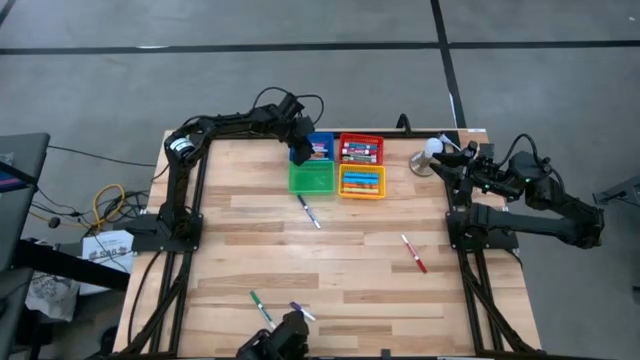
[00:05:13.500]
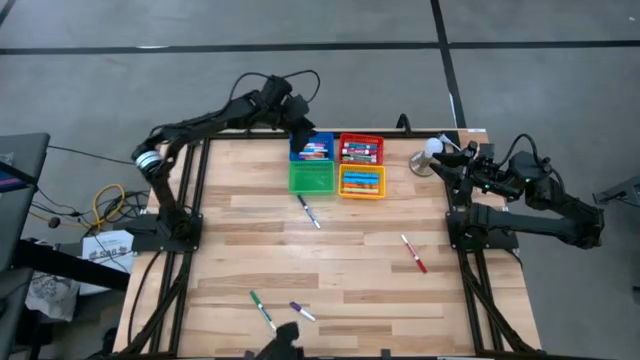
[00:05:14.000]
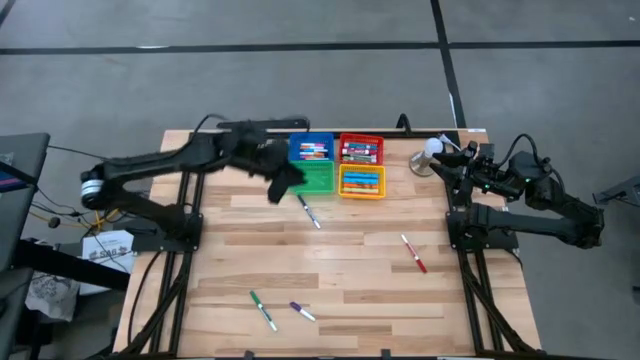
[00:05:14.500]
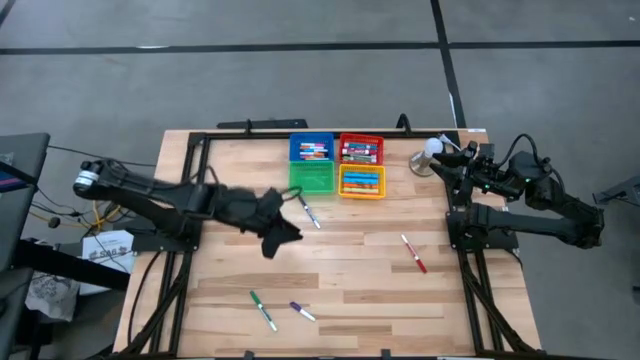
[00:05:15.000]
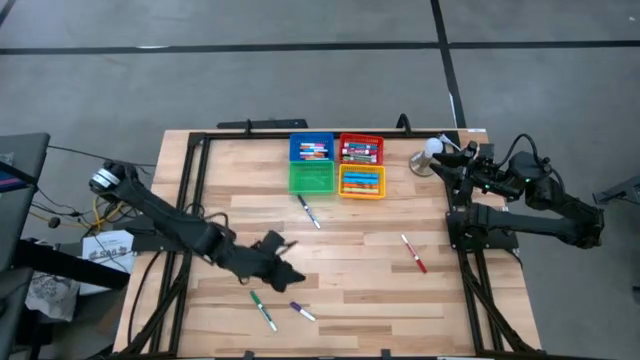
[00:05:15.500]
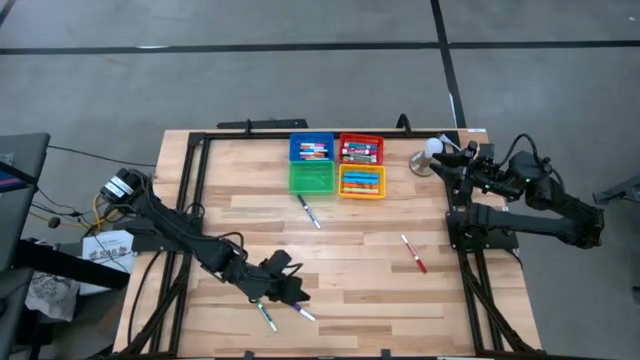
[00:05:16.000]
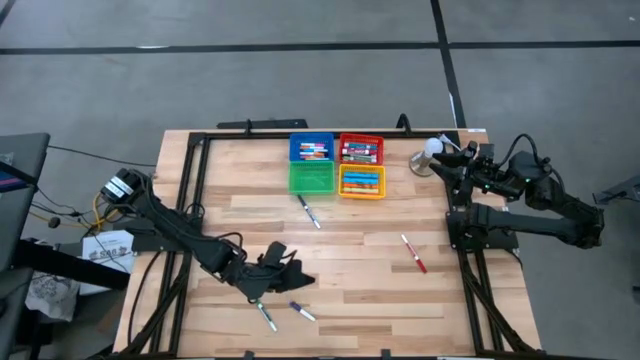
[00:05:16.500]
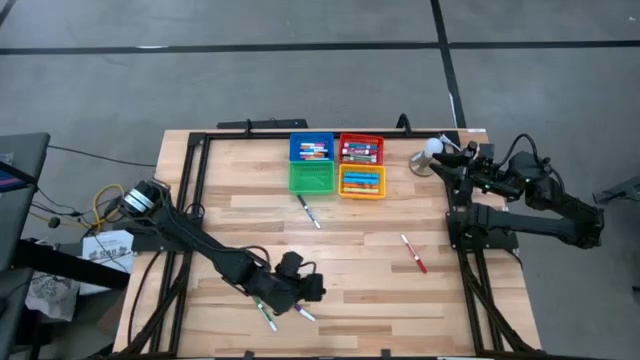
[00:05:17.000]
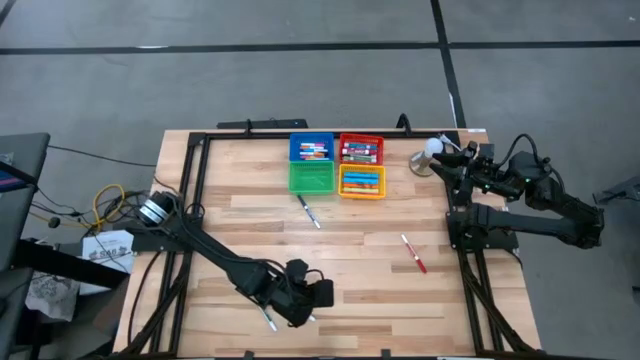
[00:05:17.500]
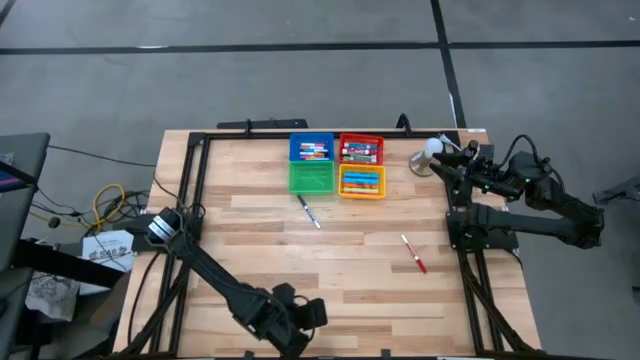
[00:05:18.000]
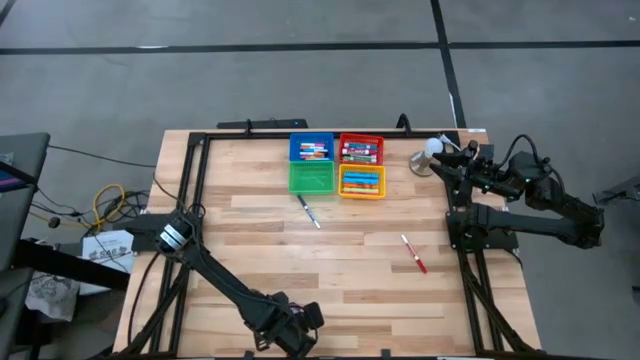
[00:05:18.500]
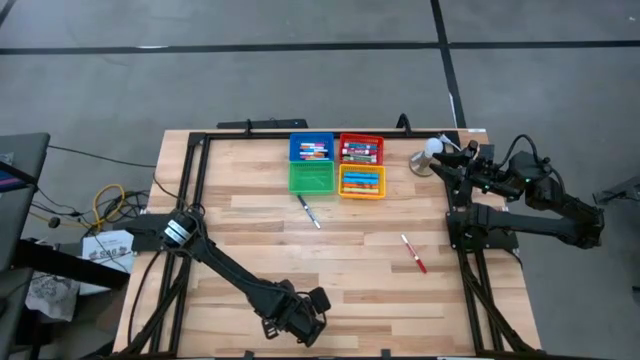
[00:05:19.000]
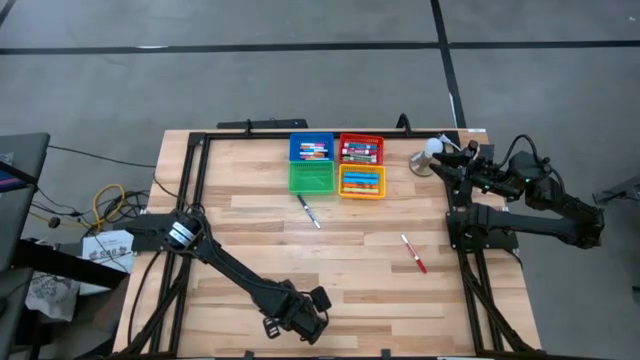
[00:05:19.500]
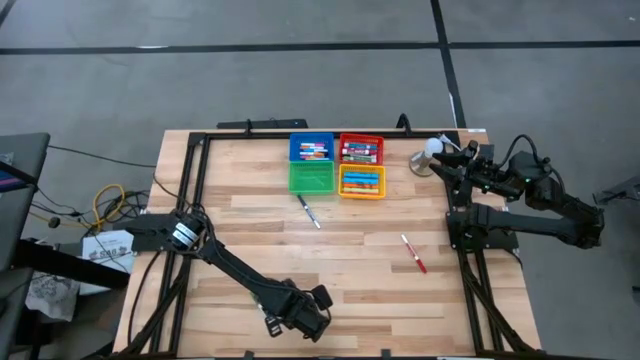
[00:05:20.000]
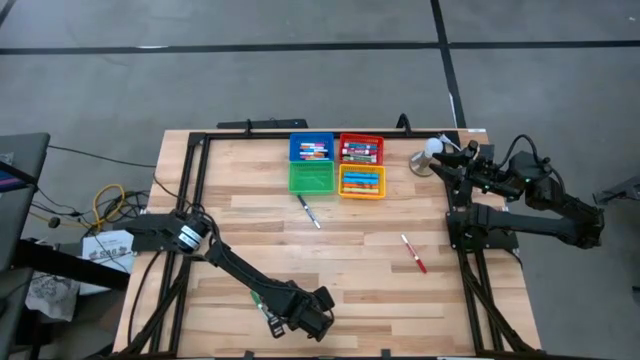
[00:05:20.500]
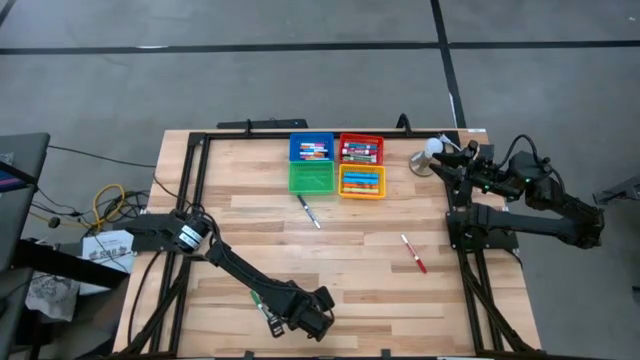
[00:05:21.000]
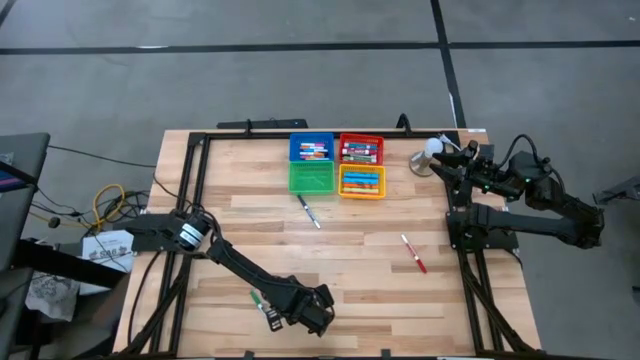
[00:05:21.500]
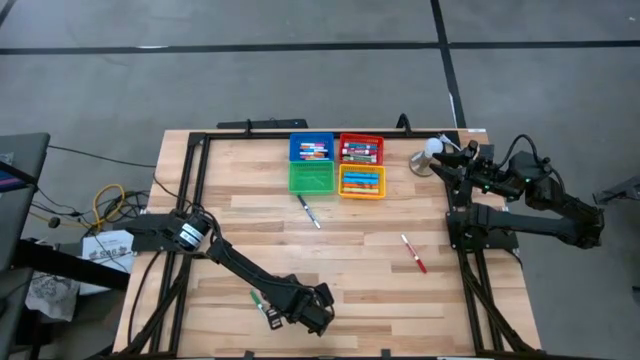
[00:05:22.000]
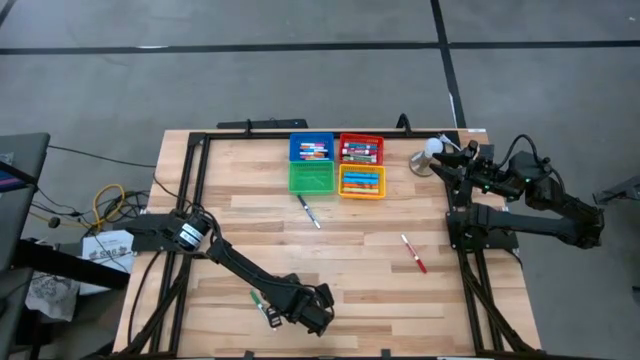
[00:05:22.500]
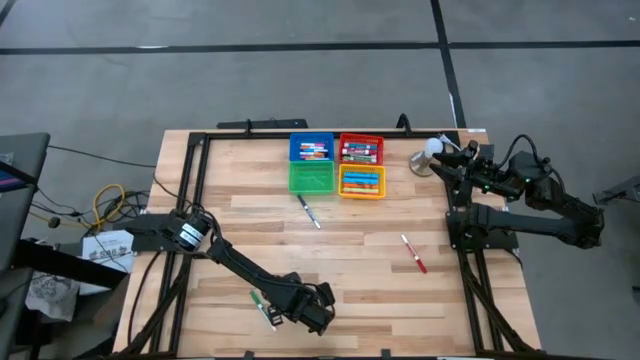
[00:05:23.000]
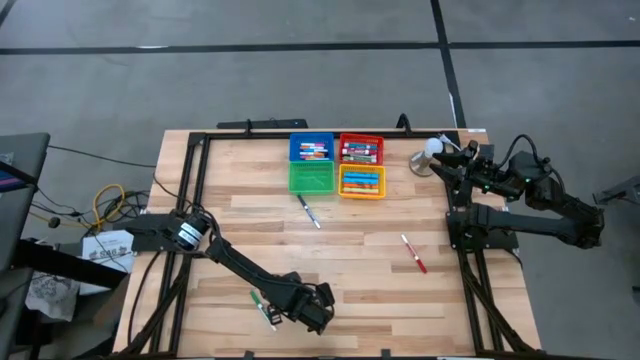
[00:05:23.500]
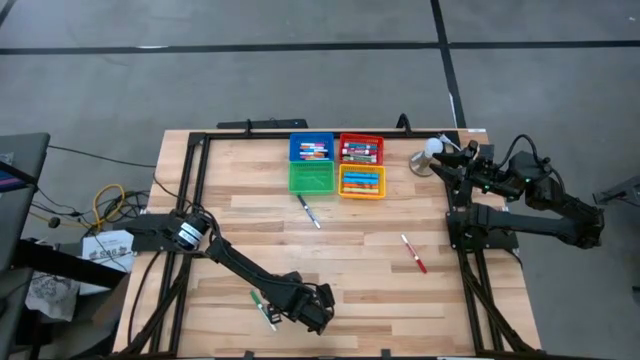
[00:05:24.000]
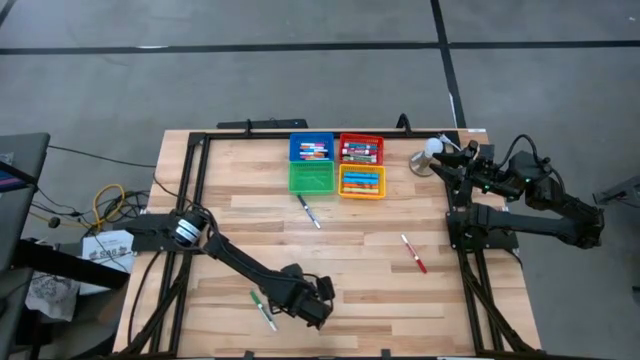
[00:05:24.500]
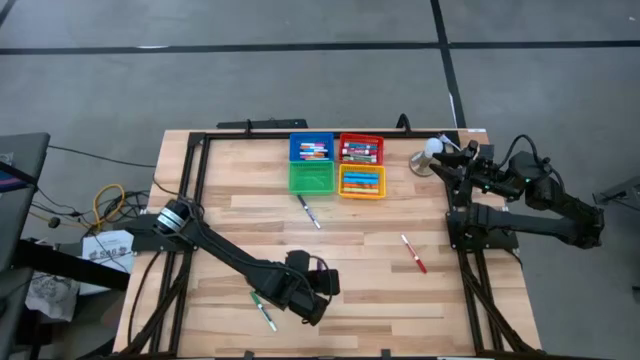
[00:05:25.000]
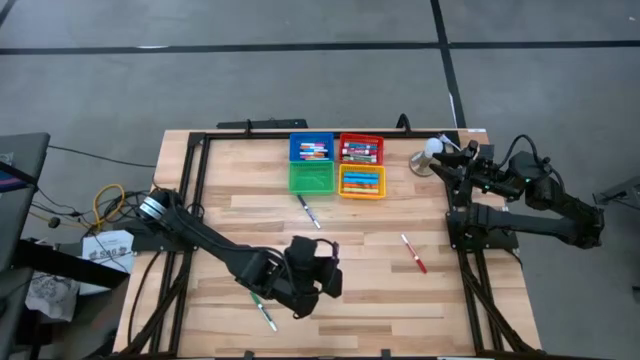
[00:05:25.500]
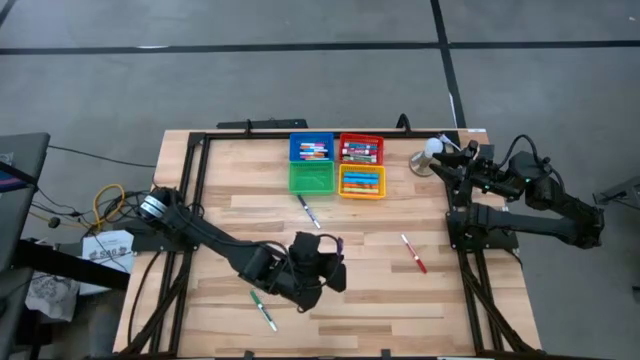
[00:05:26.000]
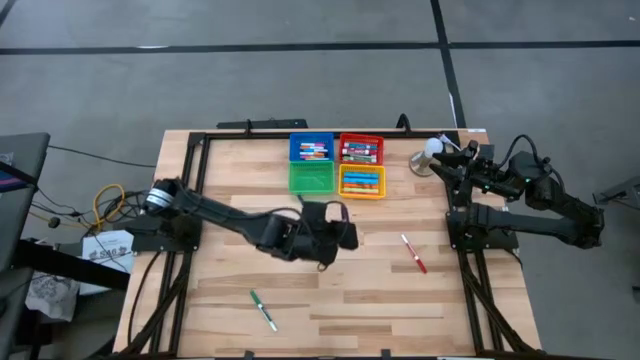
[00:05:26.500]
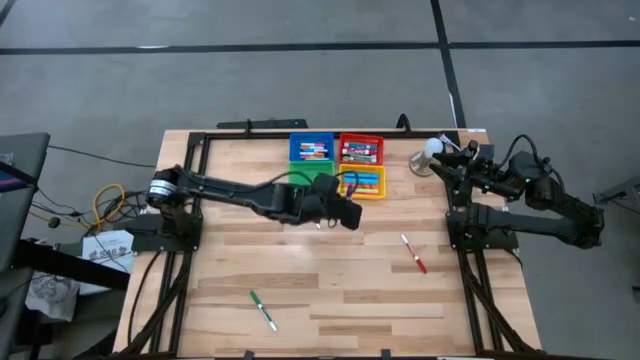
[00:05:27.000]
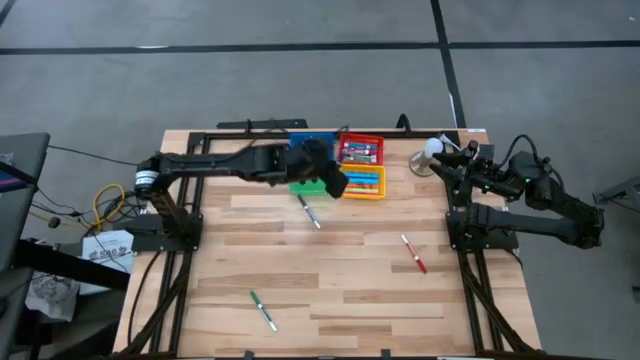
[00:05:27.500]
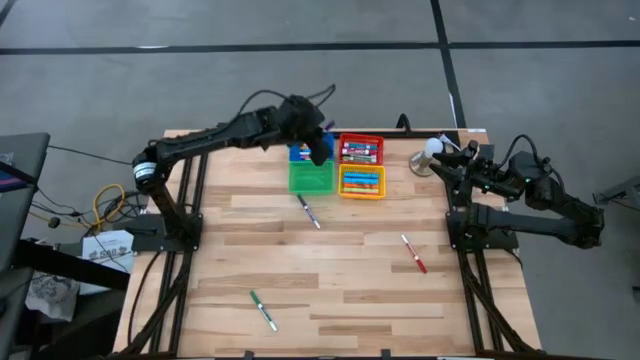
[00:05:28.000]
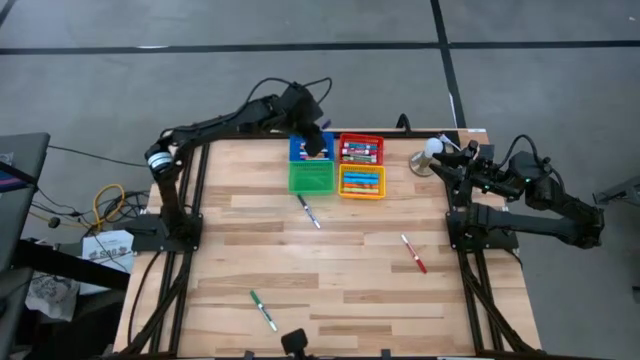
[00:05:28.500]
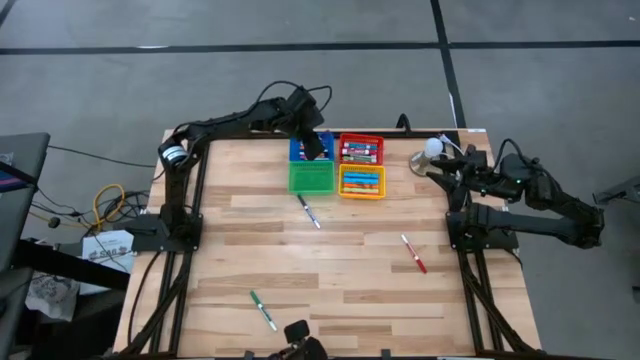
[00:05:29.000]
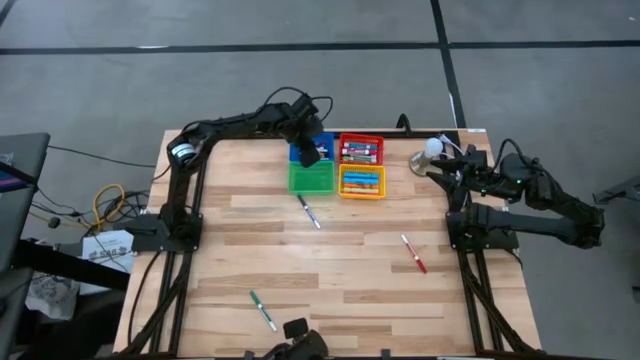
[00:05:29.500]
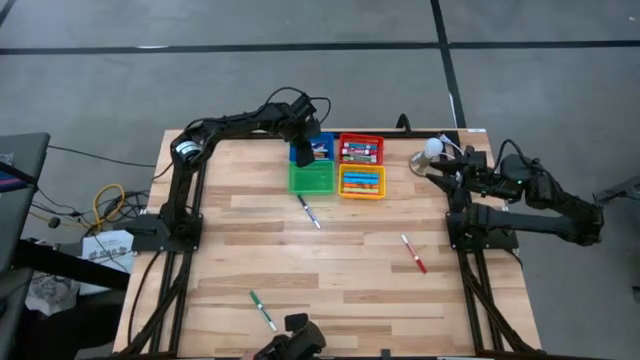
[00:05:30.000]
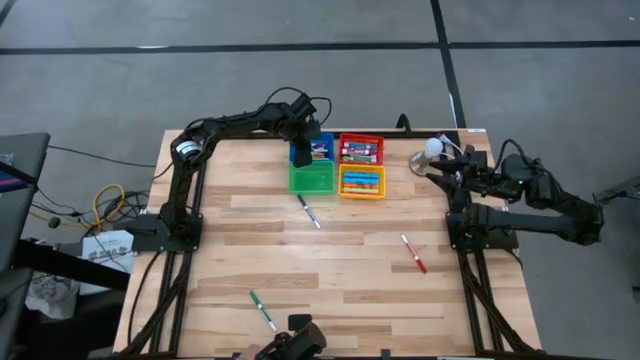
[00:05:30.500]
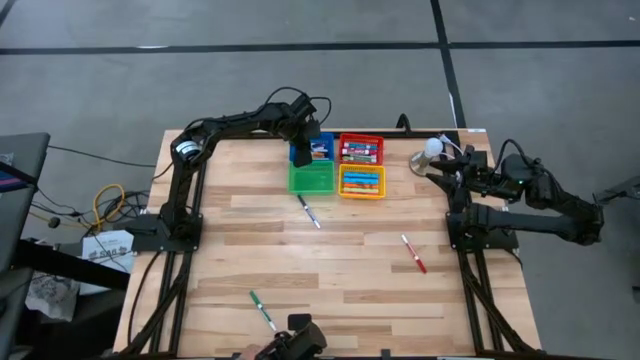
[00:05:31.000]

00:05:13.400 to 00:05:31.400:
Task: Pick & Place Markers
Put the violet pen into the blue bin
